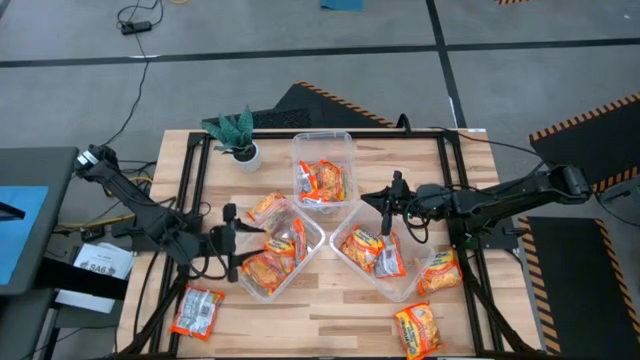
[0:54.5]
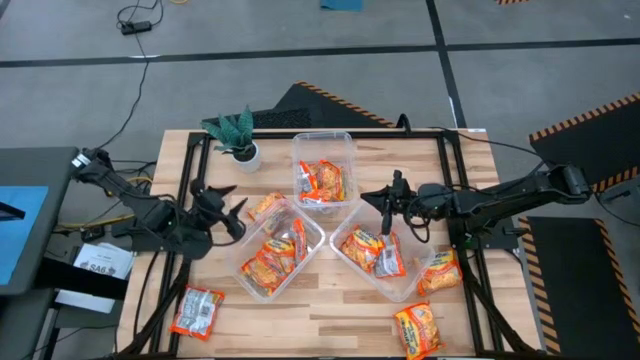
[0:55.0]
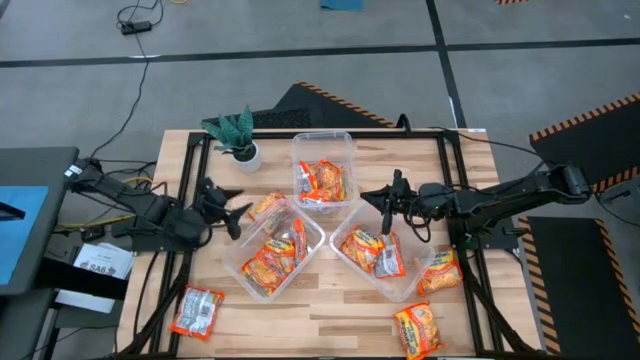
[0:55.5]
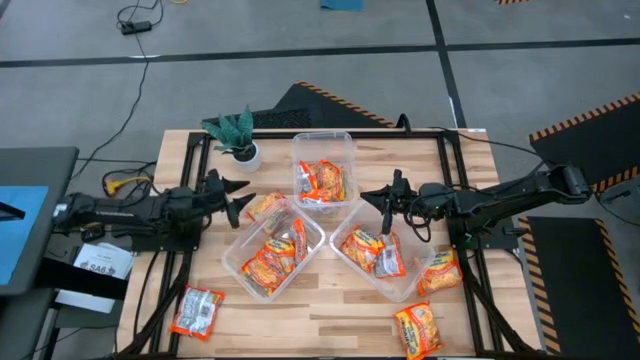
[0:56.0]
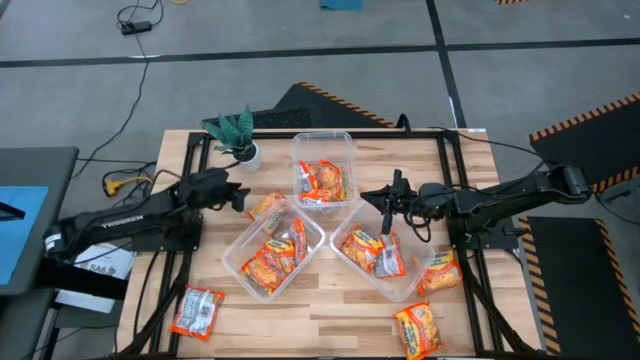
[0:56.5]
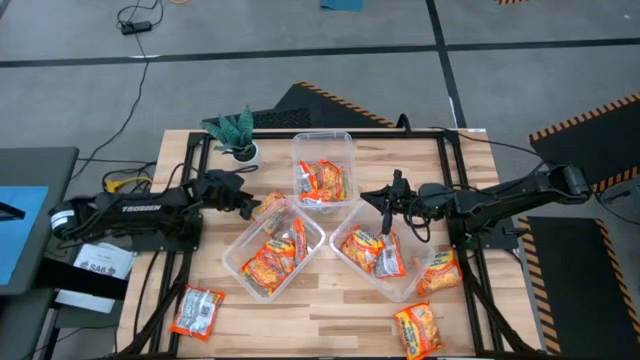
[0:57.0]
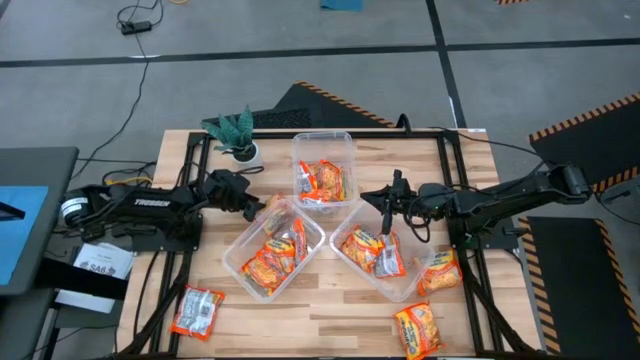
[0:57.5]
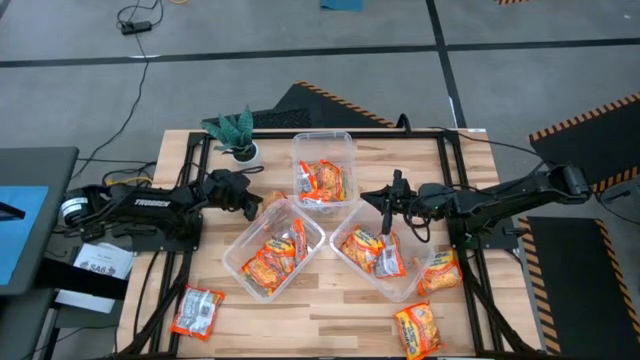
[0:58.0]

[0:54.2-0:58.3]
Task: Sort Maruchan noodles
Put the orange noodle pack into the bottom left transparent container

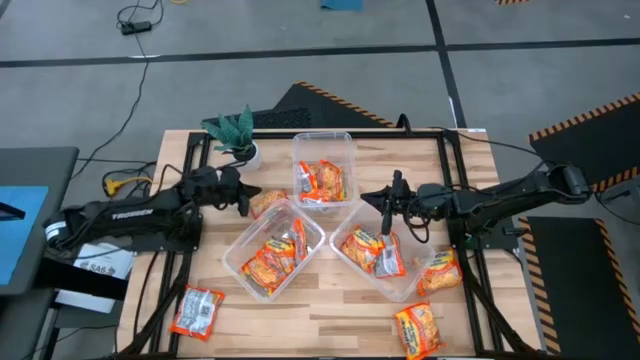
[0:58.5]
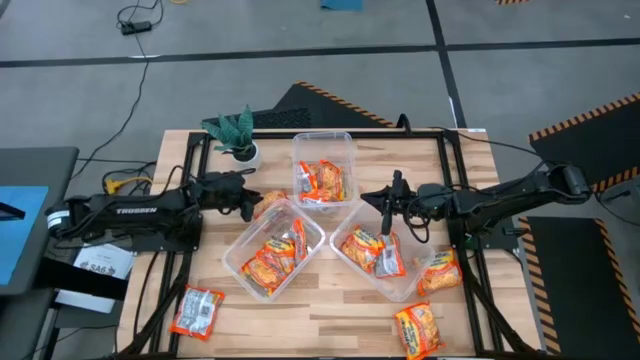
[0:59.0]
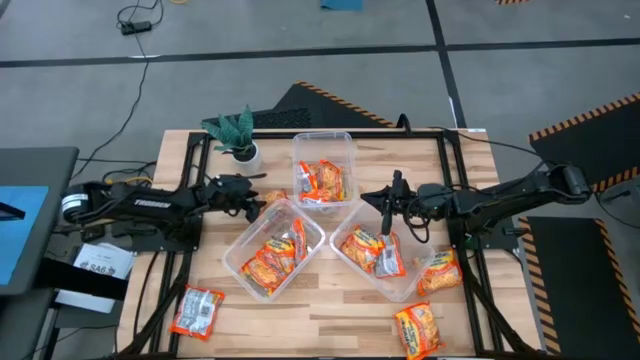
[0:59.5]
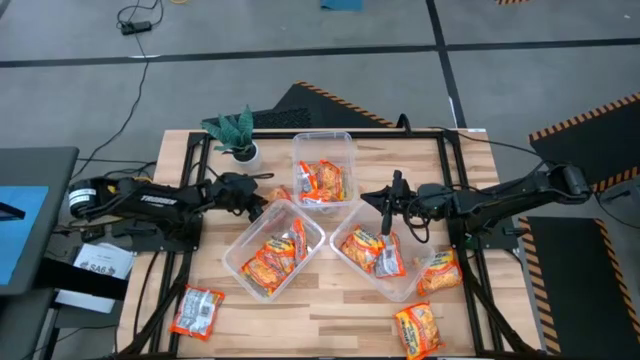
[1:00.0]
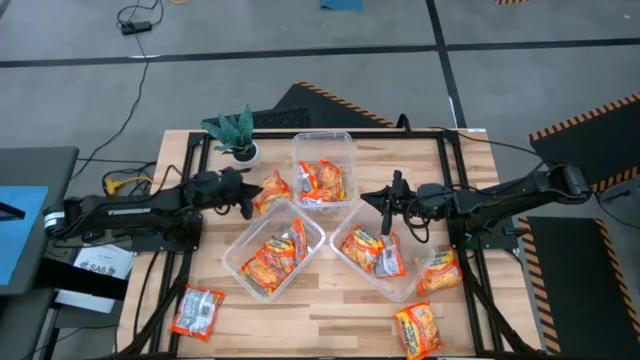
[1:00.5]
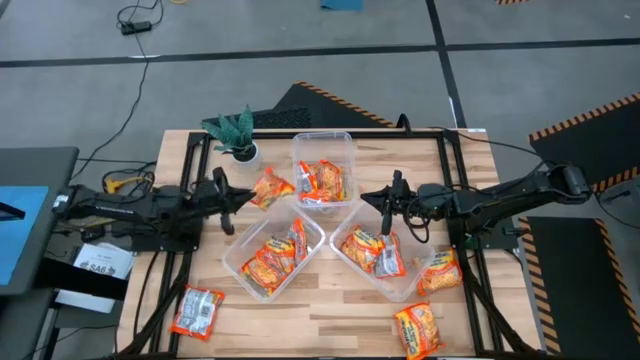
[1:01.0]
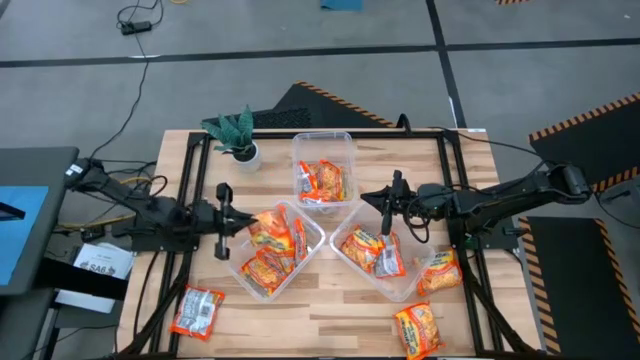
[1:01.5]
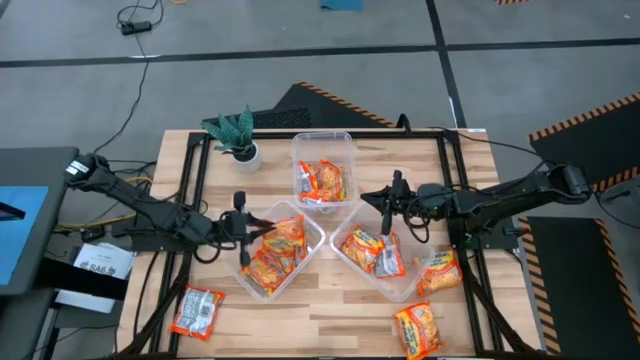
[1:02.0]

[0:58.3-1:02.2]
Put the orange noodle pack into the bottom left transparent container

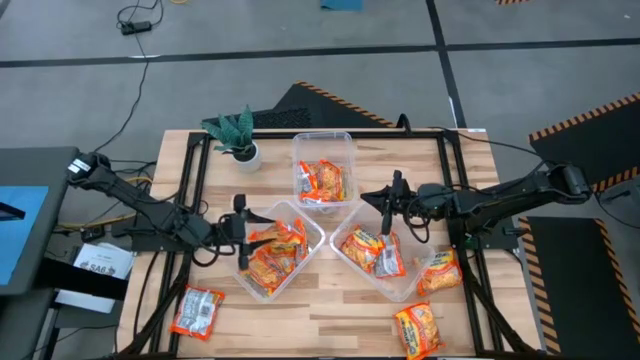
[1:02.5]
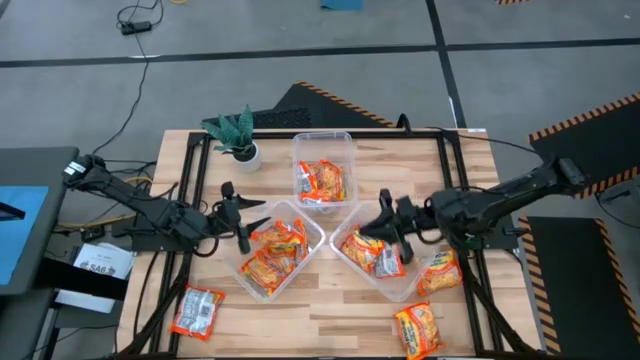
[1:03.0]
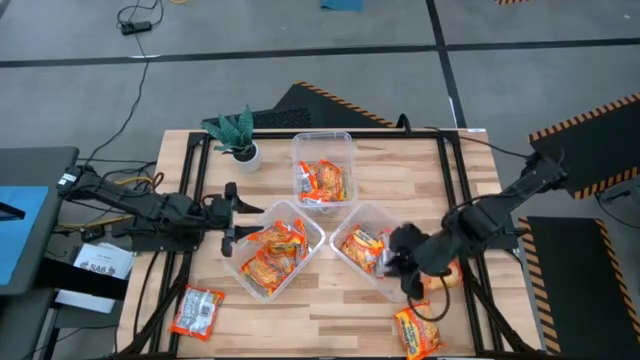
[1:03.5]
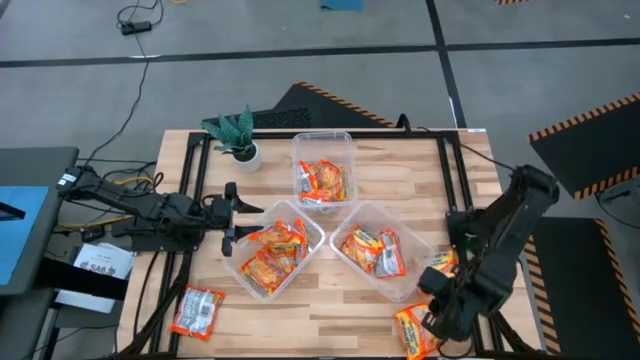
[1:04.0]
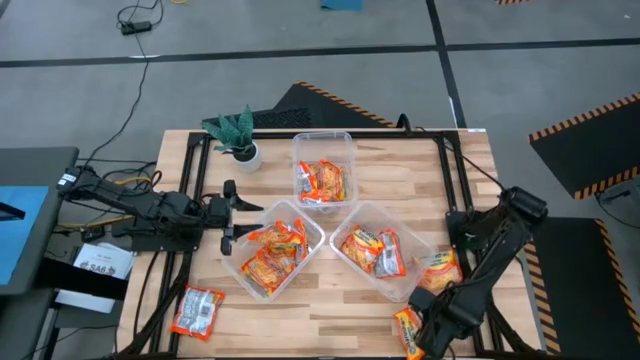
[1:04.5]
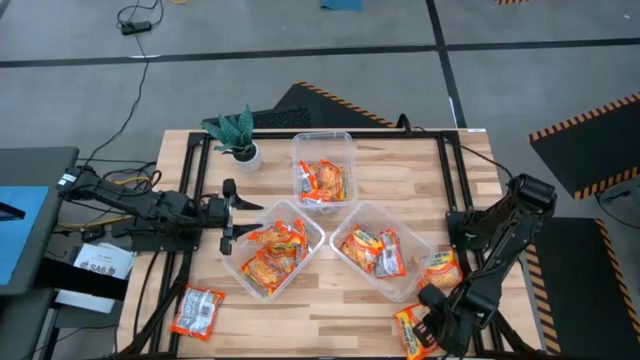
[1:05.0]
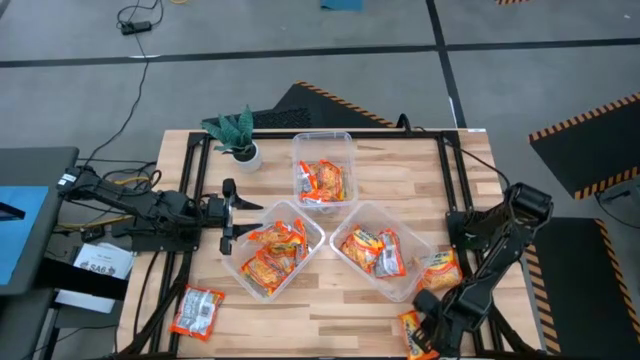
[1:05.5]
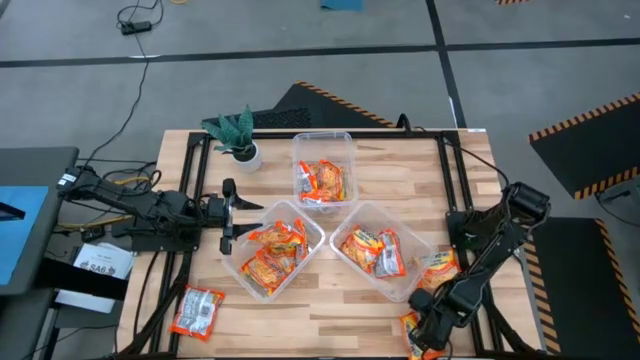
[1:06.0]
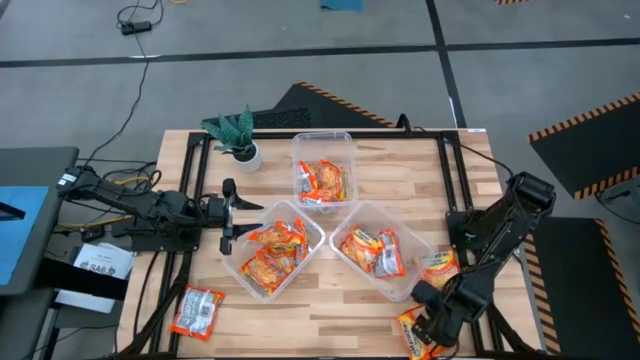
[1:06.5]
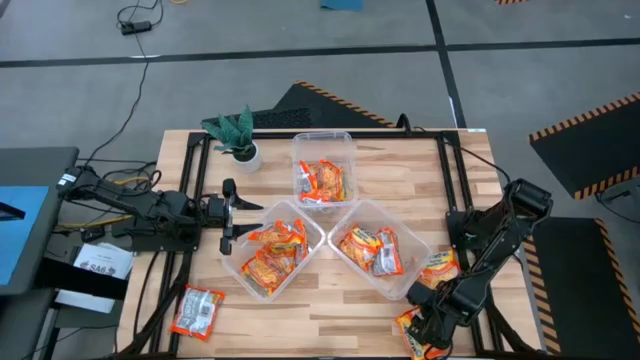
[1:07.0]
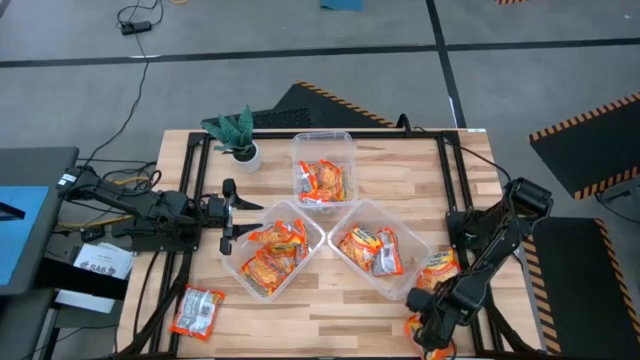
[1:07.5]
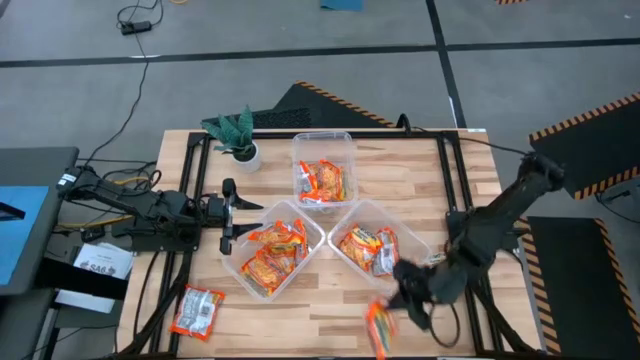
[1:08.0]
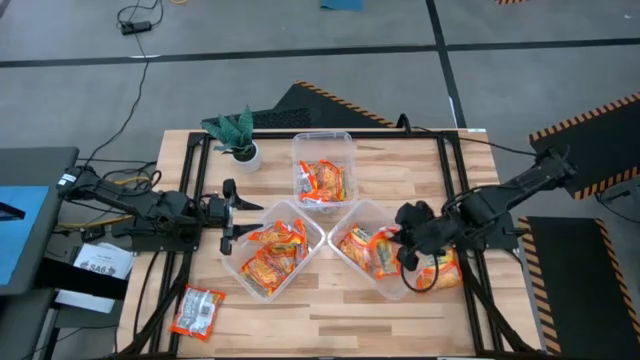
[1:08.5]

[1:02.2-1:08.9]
Put the orange noodle pack into the bottom right transparent container

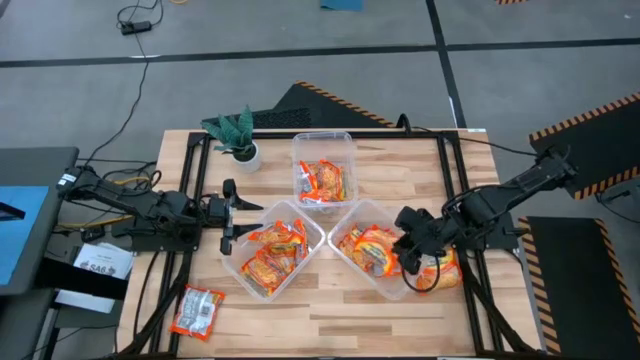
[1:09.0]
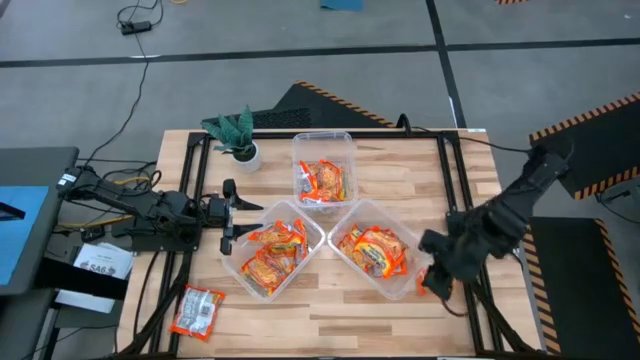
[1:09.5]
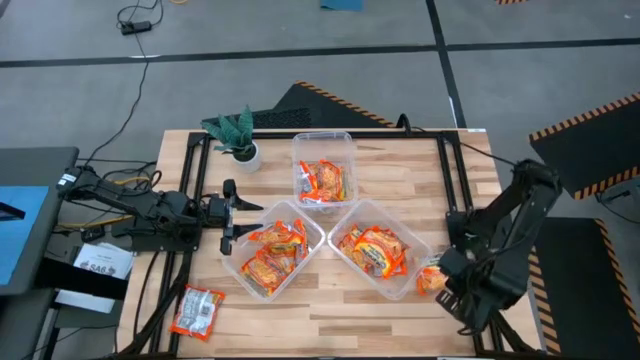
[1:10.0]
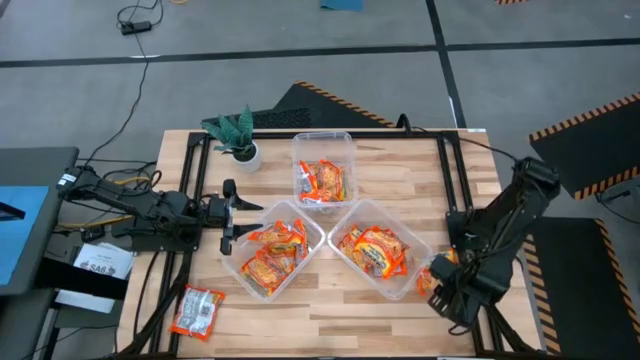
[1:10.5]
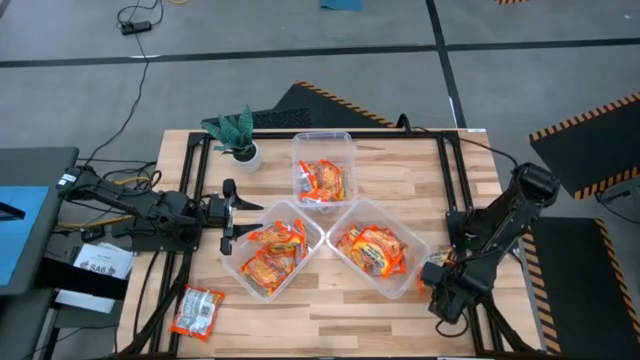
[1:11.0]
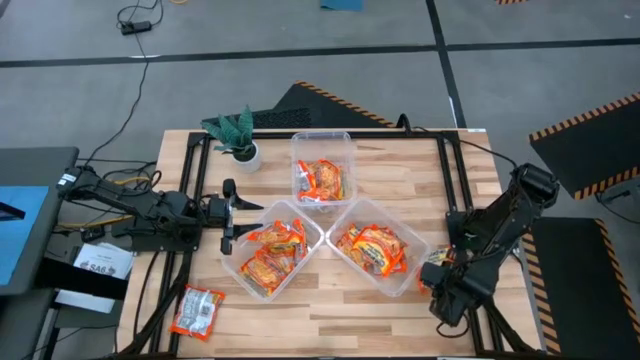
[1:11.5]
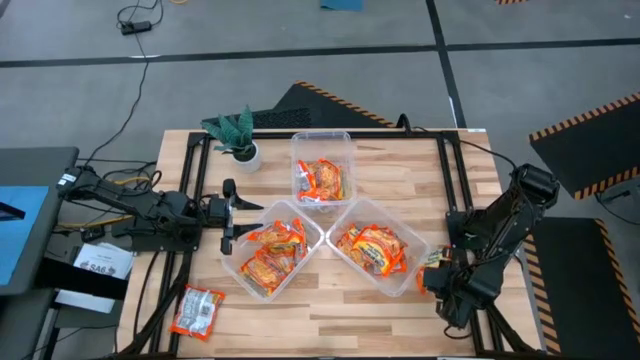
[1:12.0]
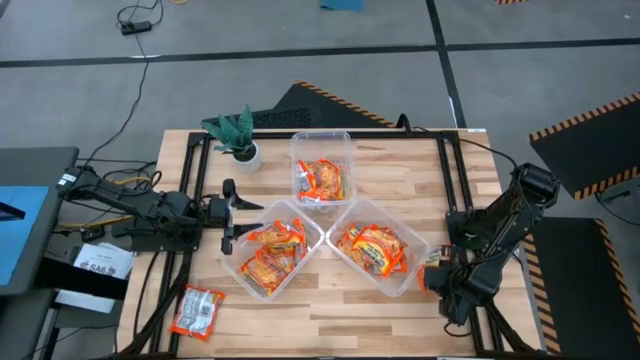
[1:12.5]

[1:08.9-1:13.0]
Put the orange noodle pack into the top transparent container

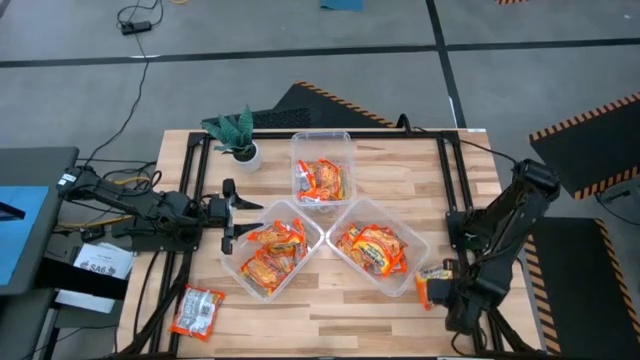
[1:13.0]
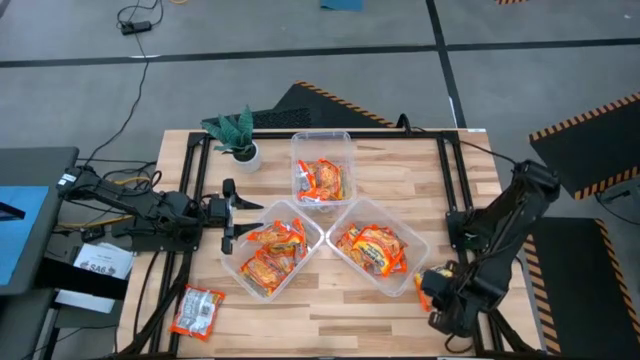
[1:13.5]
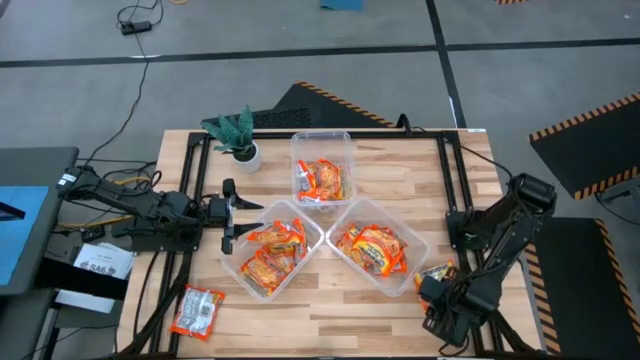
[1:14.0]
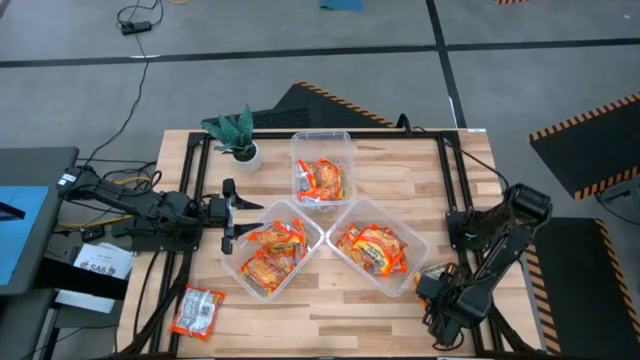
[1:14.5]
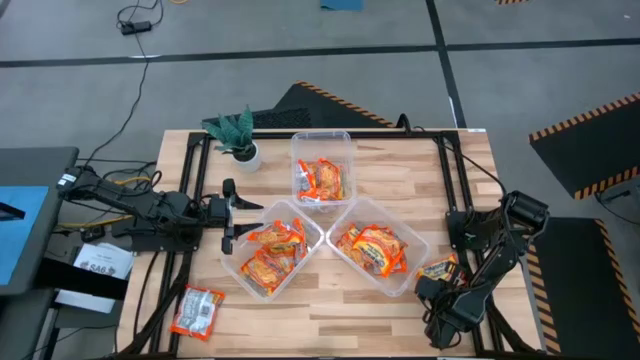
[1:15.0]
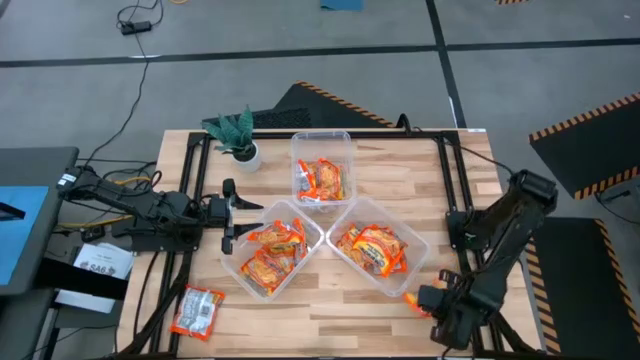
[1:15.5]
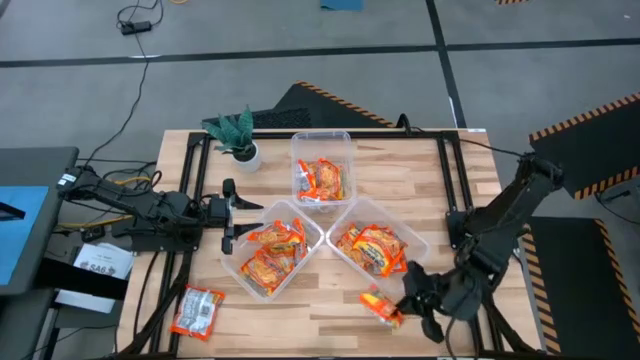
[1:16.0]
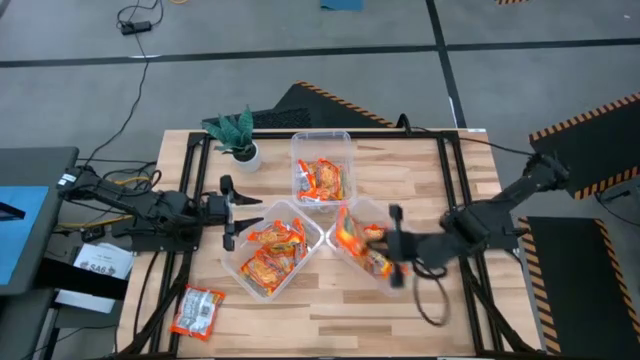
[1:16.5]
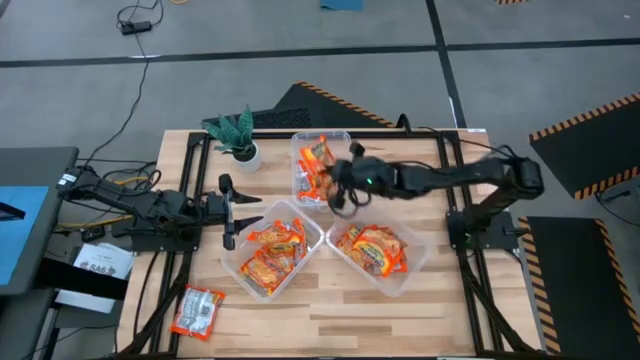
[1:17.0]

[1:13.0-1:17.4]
Put the orange noodle pack into the top transparent container
